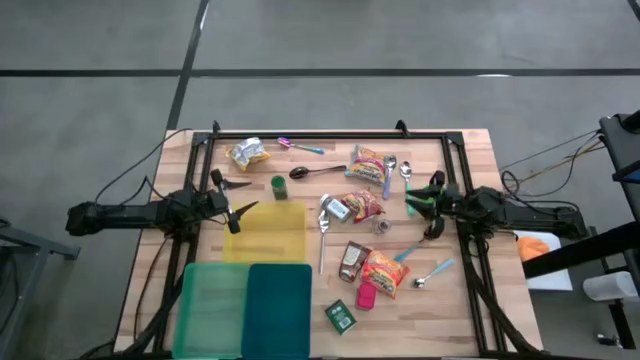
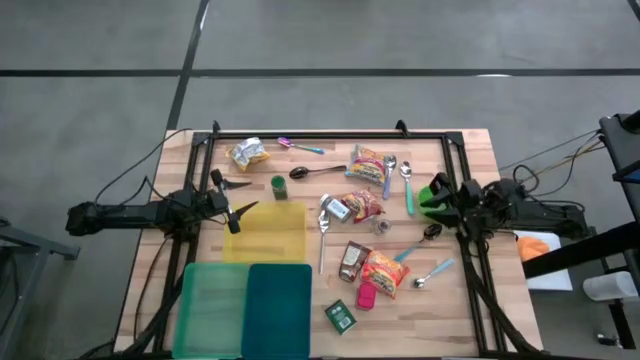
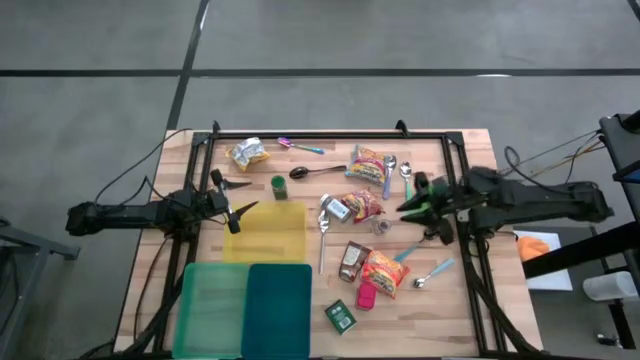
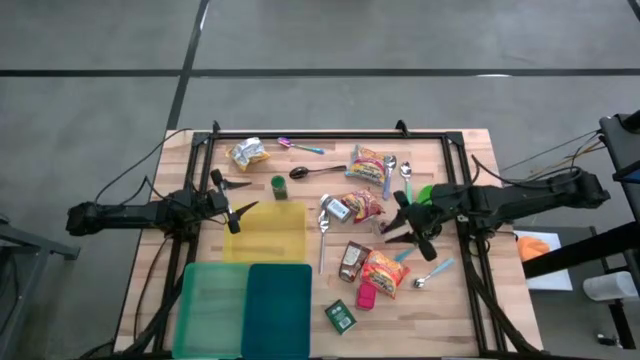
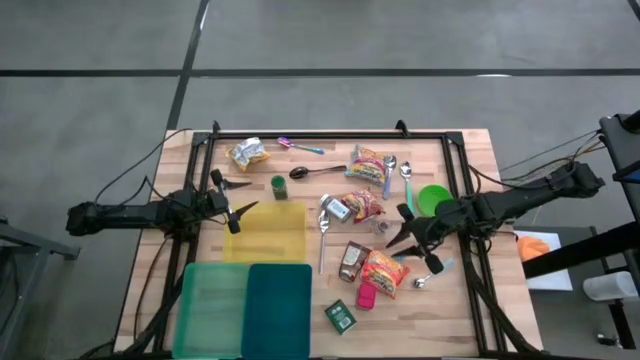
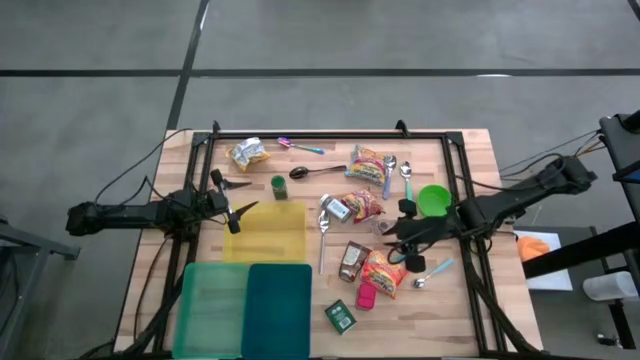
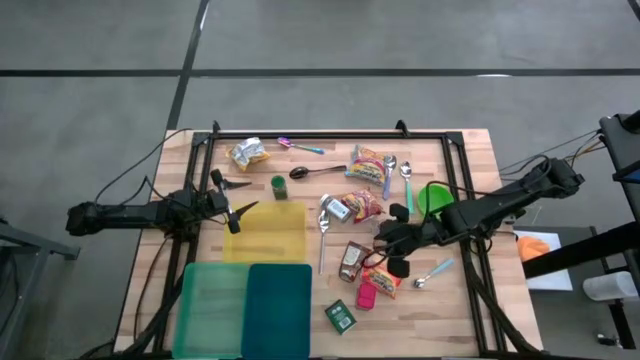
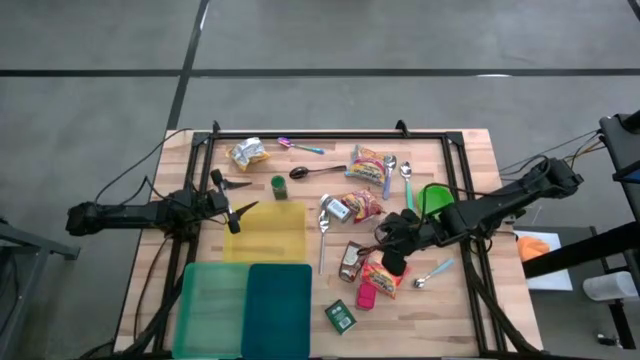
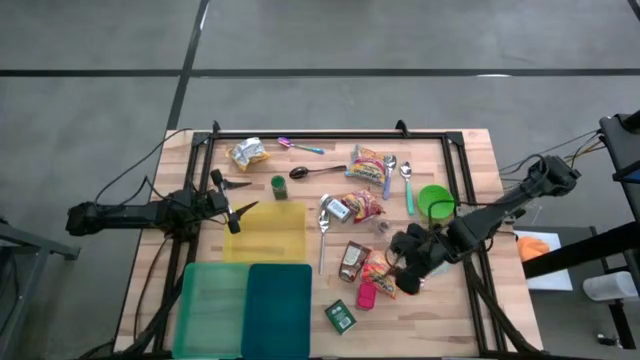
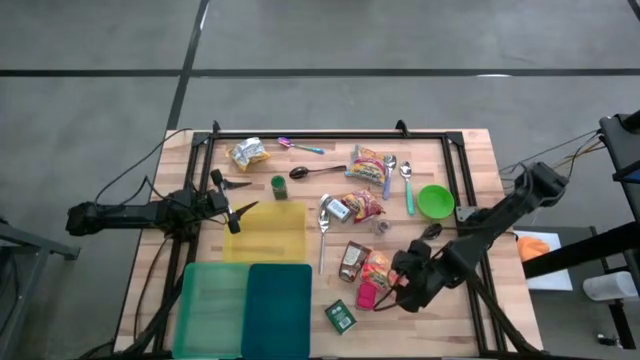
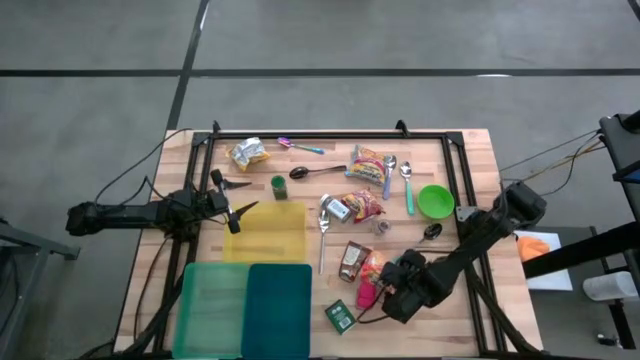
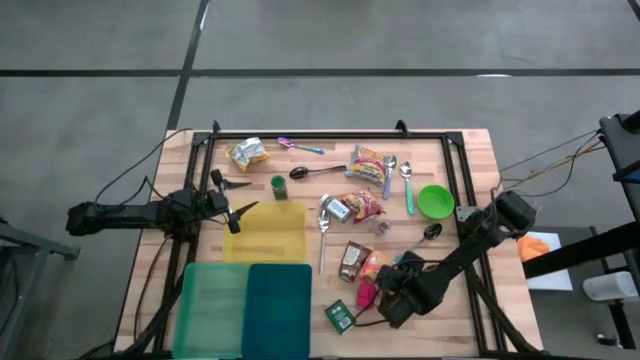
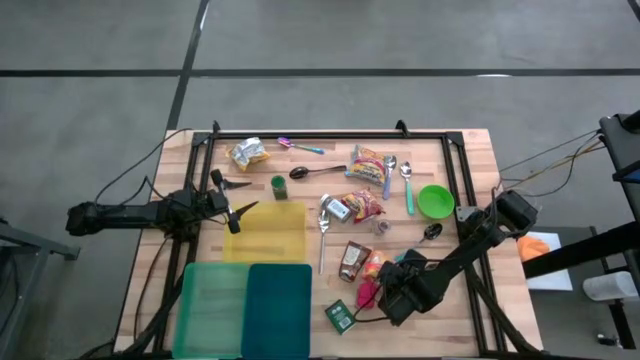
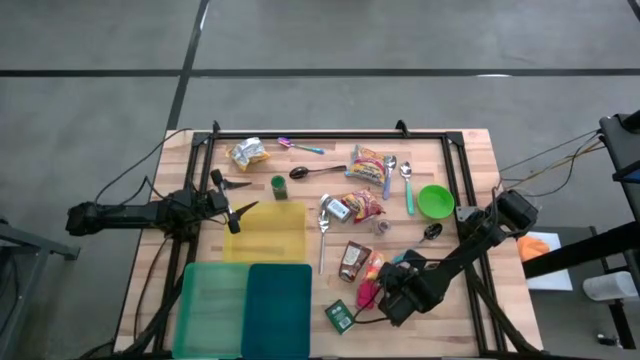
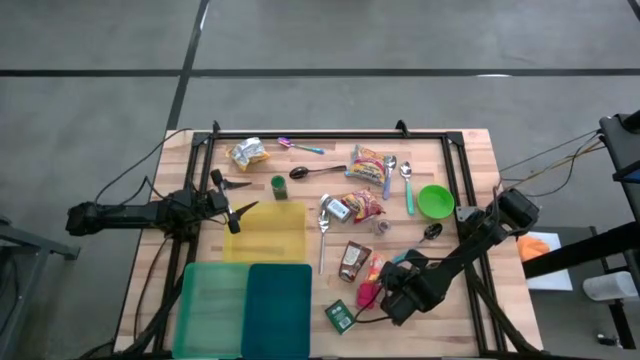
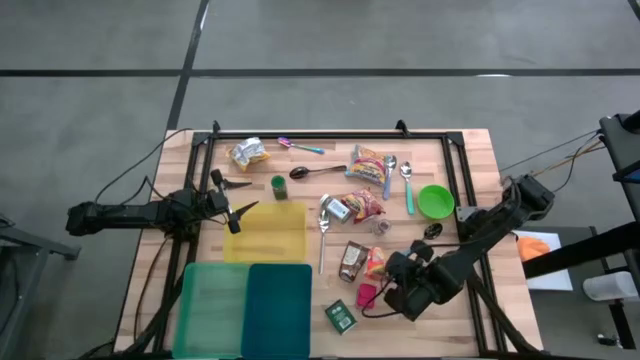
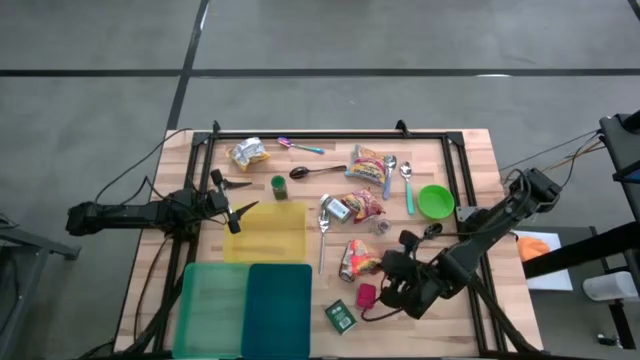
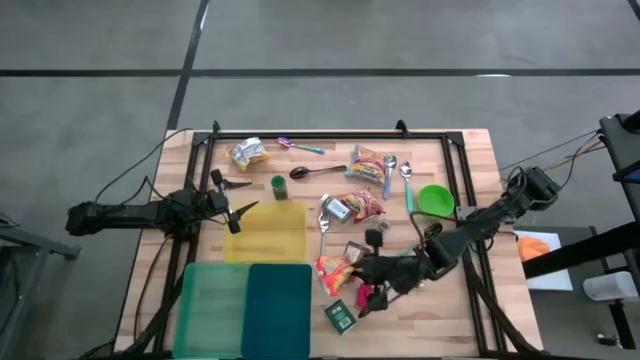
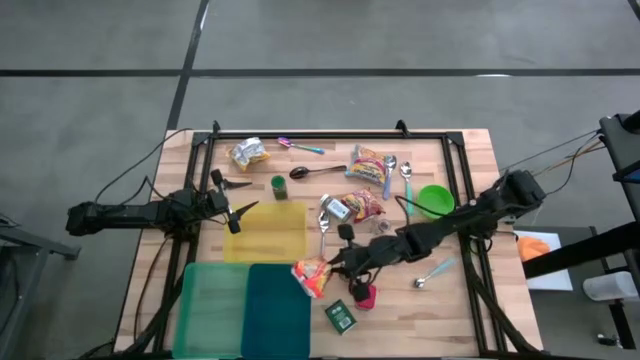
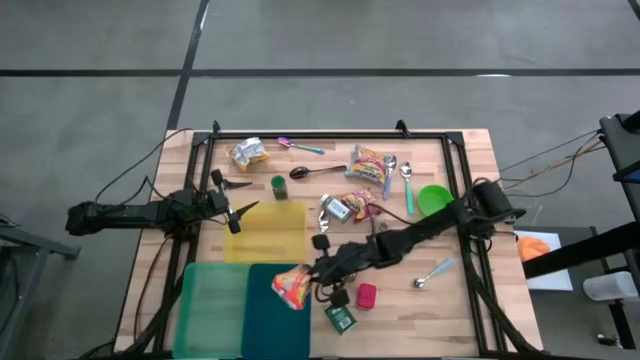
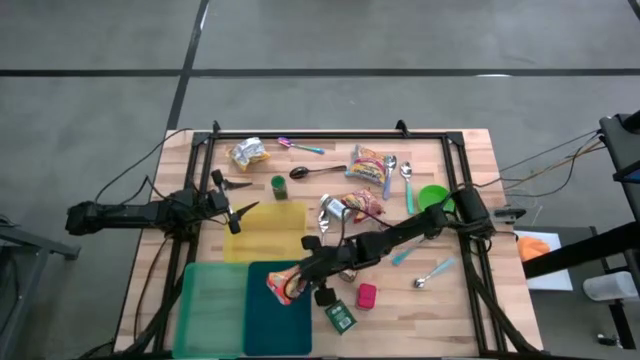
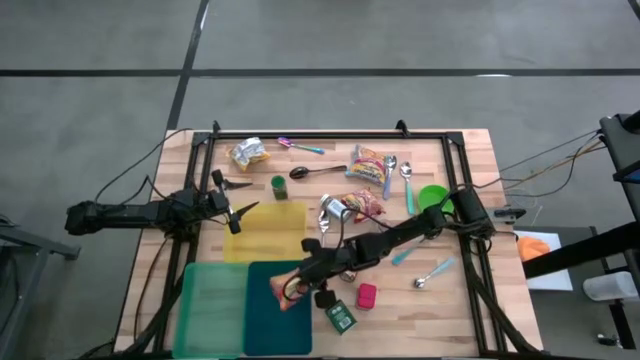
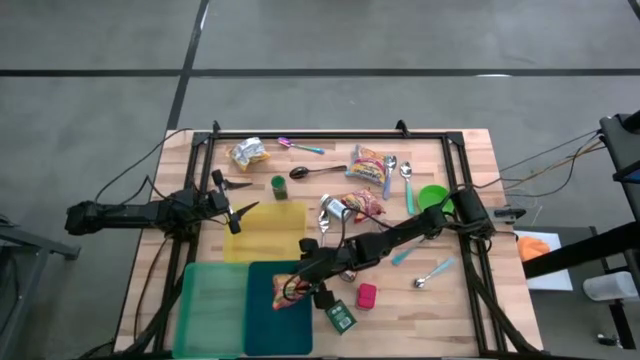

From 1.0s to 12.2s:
Put the orange noodle pack into the blue bin

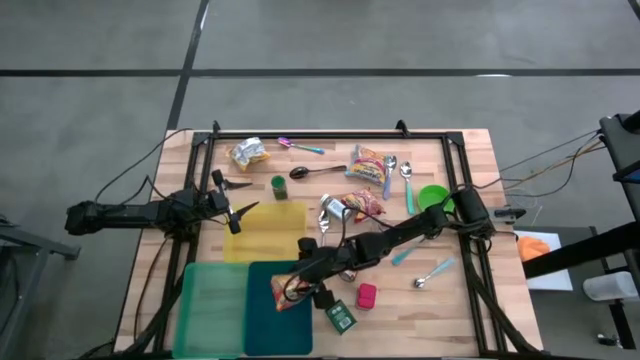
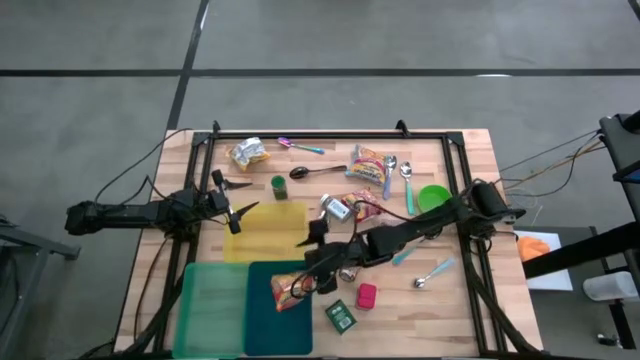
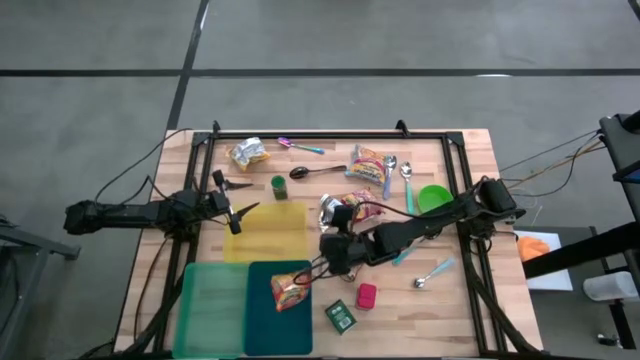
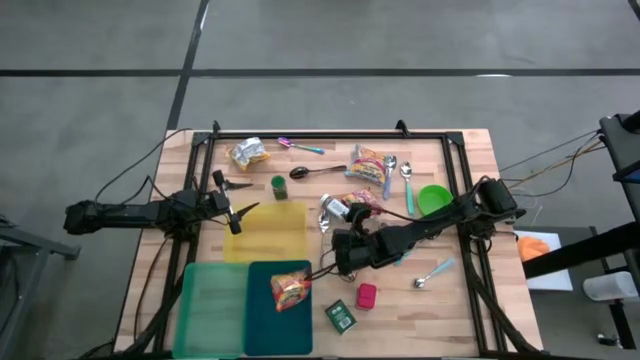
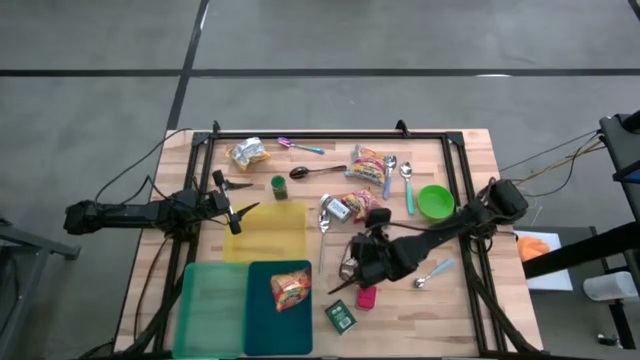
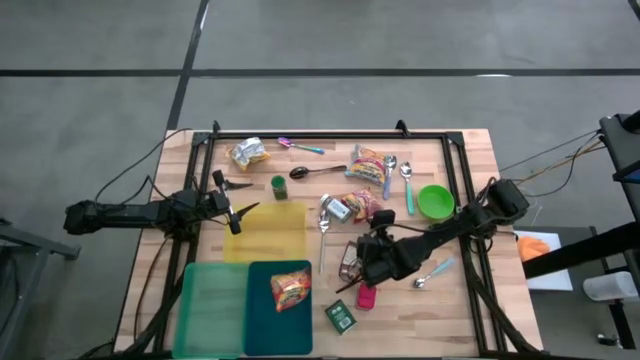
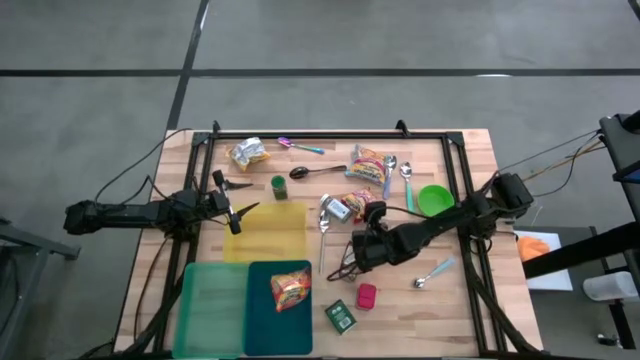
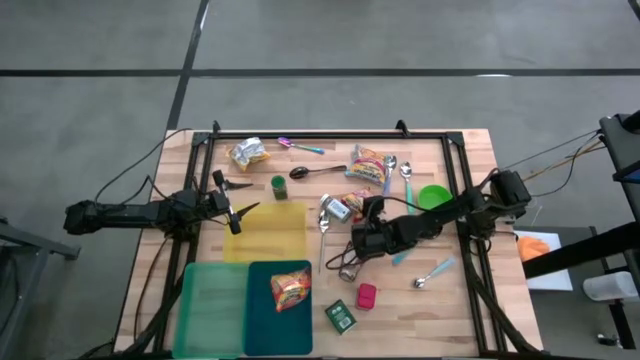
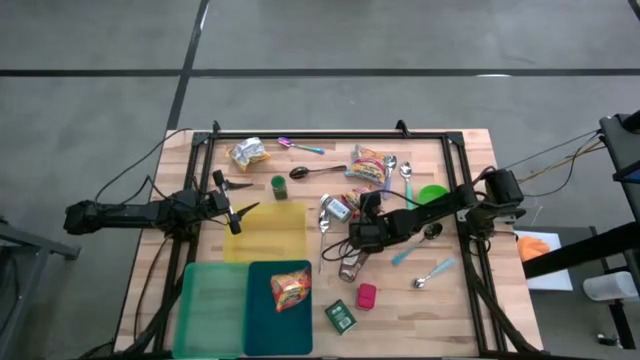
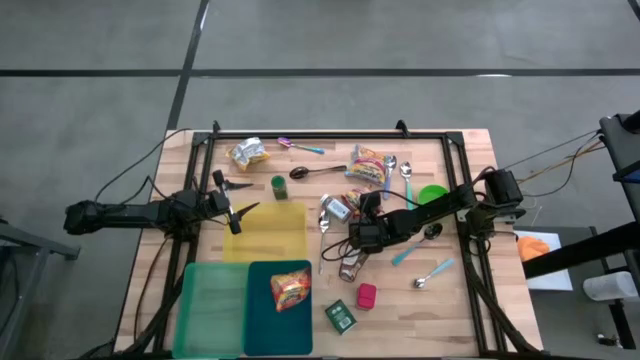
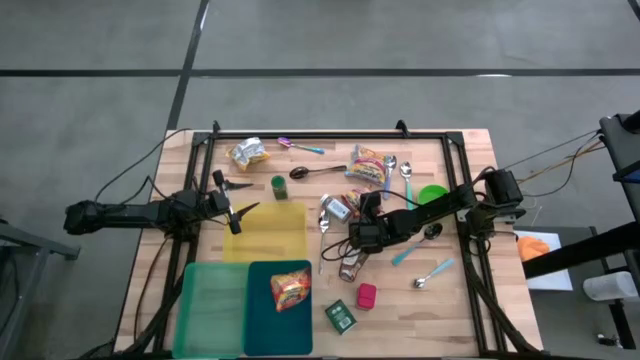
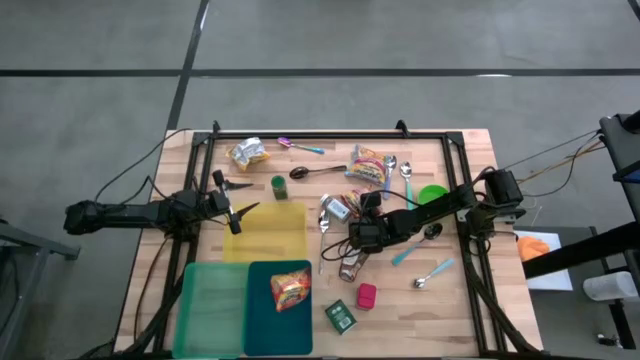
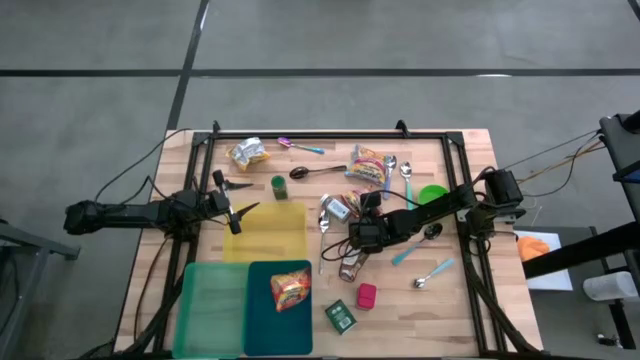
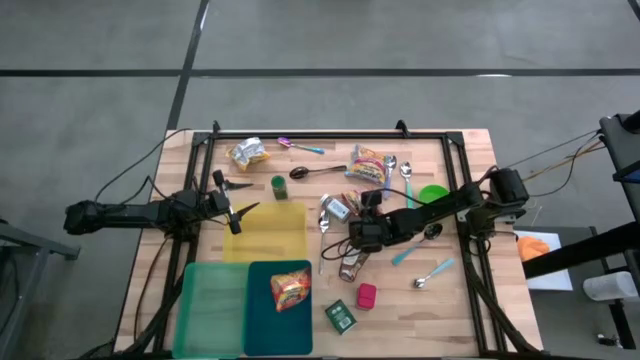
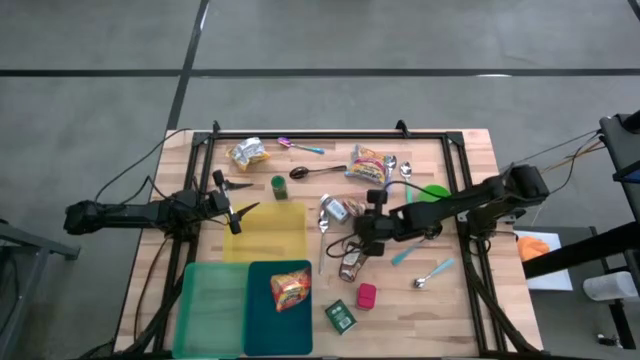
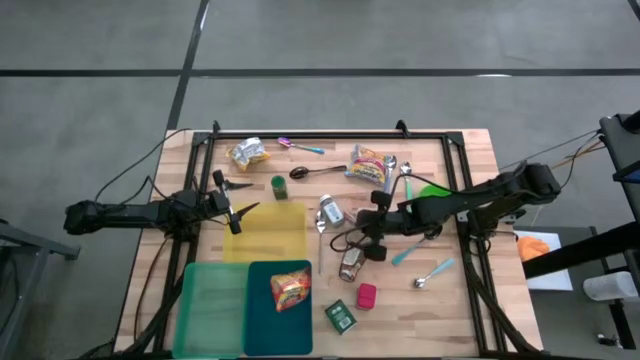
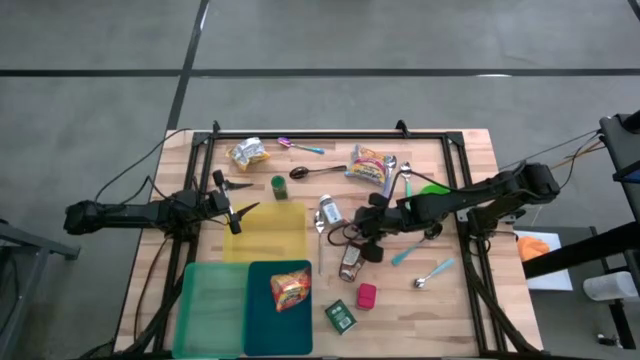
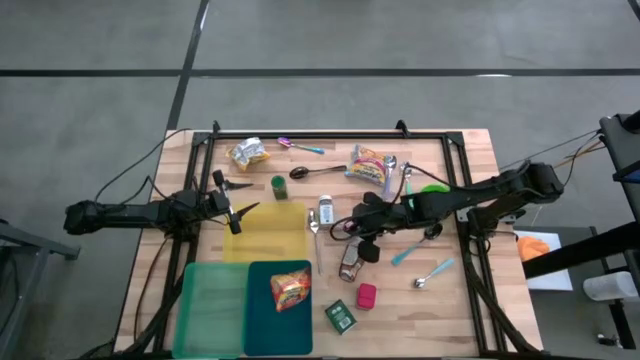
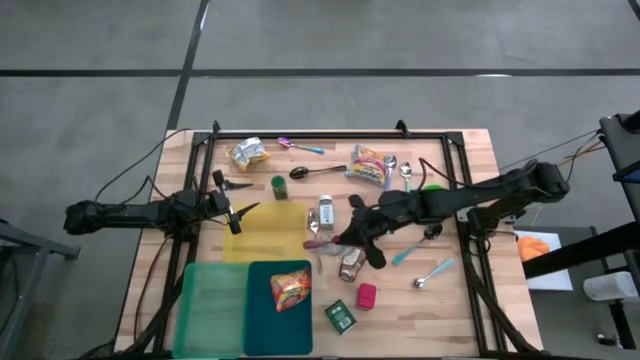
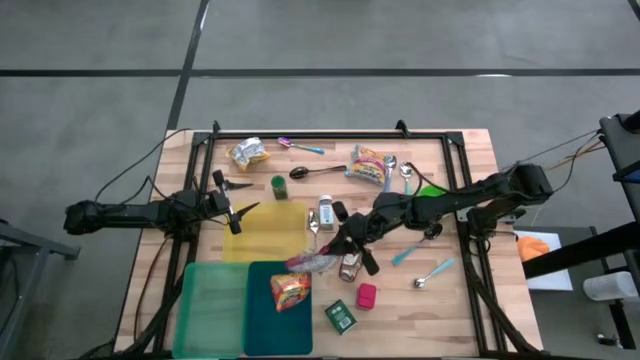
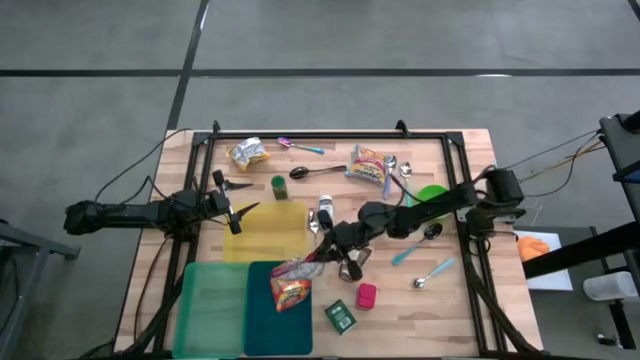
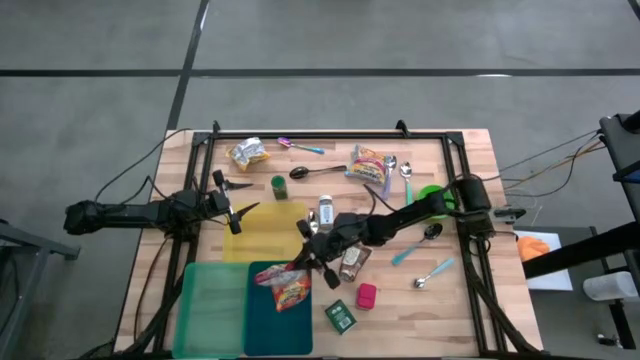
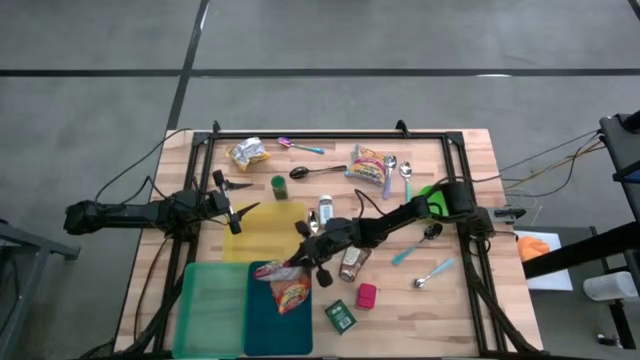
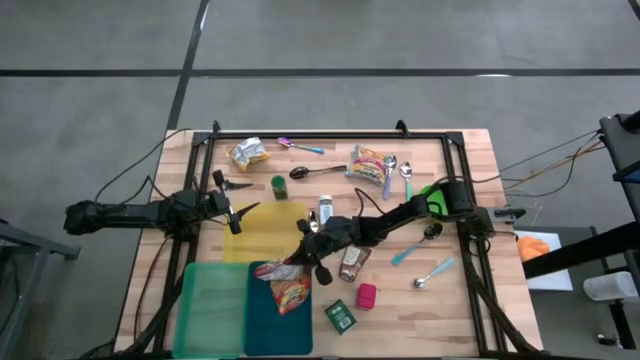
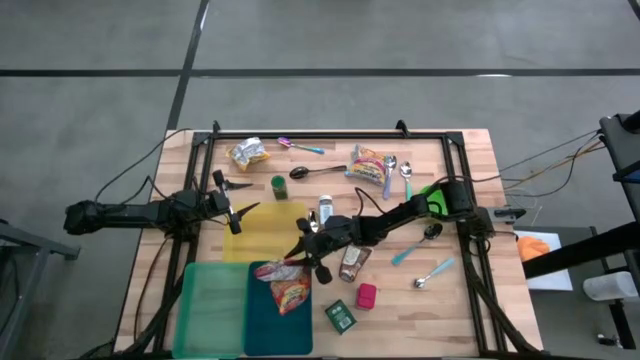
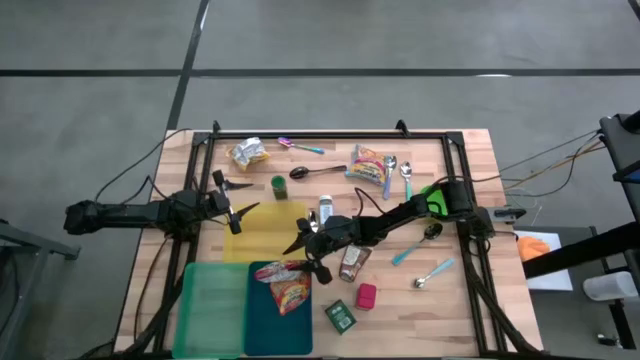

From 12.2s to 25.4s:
Put the red noodle pack into the blue bin
